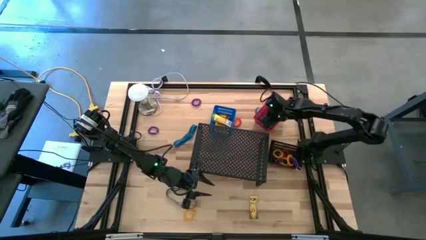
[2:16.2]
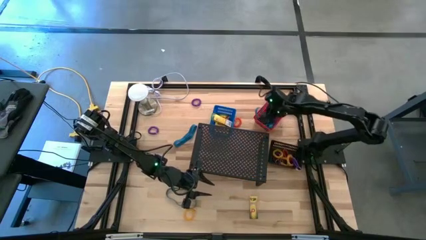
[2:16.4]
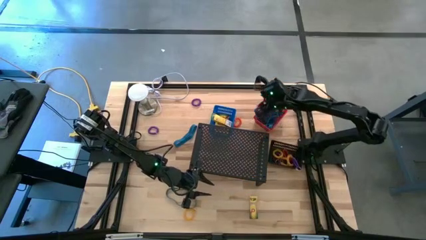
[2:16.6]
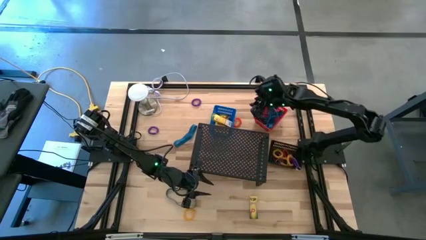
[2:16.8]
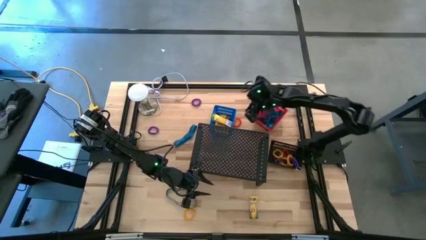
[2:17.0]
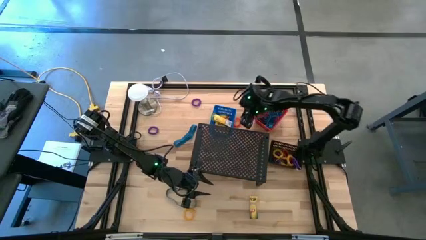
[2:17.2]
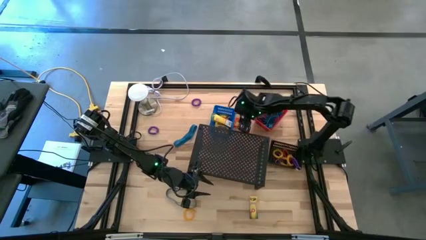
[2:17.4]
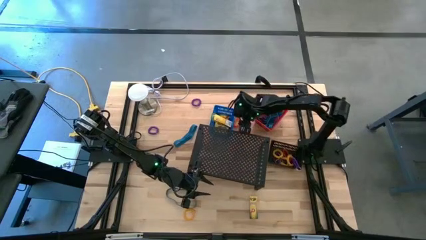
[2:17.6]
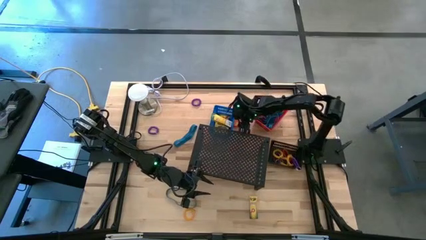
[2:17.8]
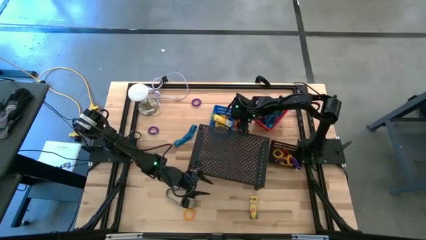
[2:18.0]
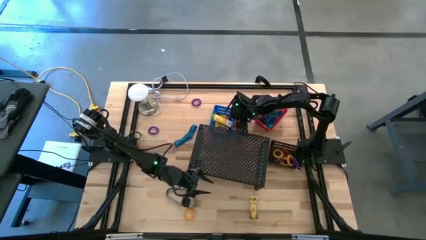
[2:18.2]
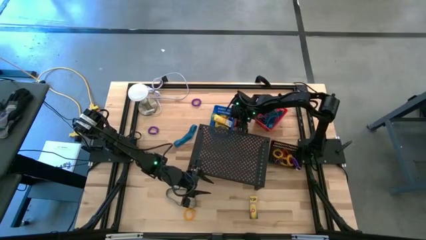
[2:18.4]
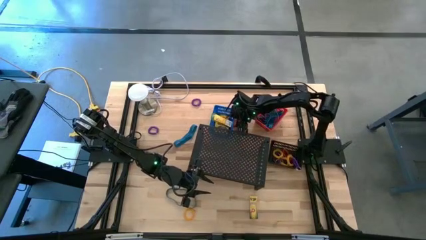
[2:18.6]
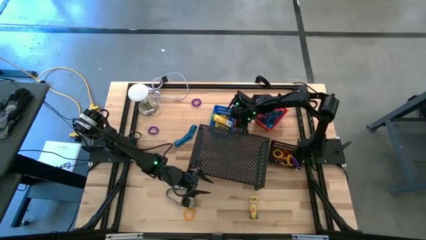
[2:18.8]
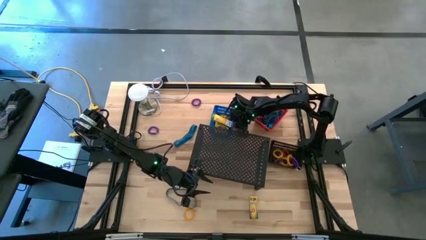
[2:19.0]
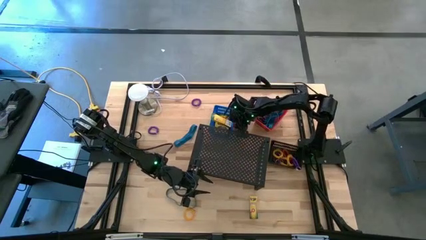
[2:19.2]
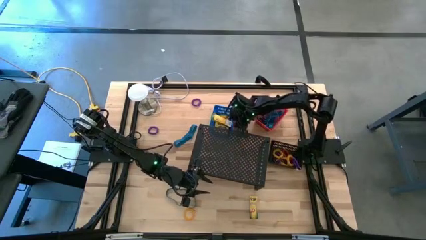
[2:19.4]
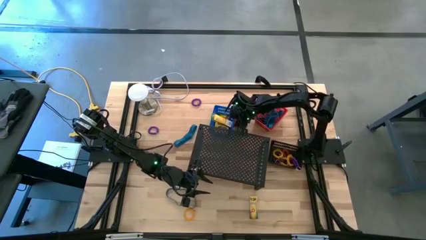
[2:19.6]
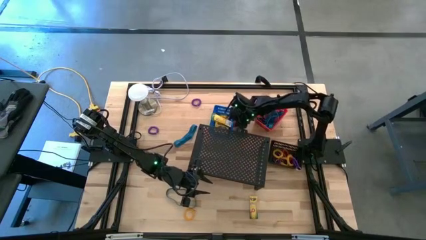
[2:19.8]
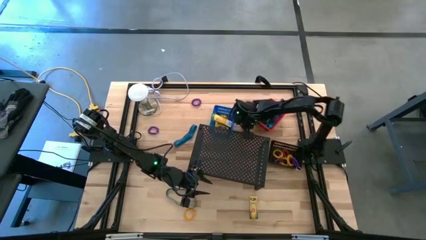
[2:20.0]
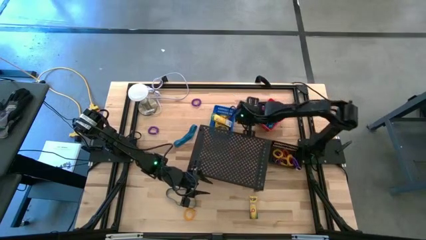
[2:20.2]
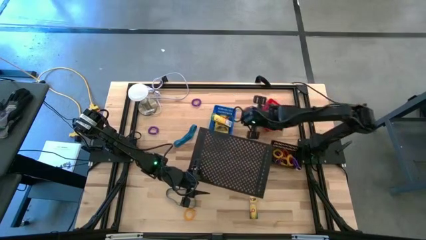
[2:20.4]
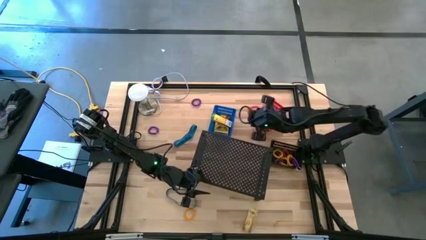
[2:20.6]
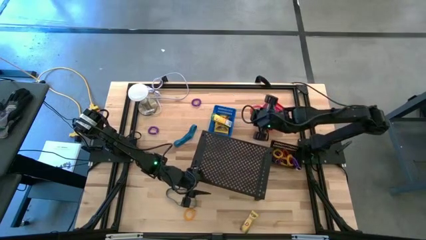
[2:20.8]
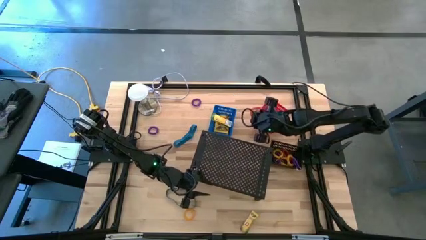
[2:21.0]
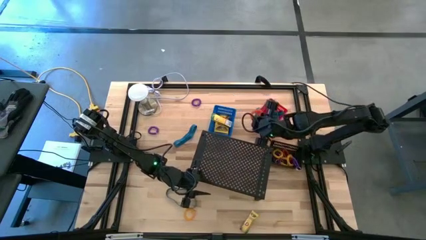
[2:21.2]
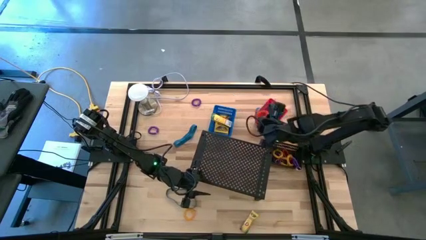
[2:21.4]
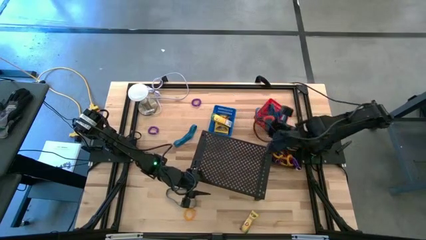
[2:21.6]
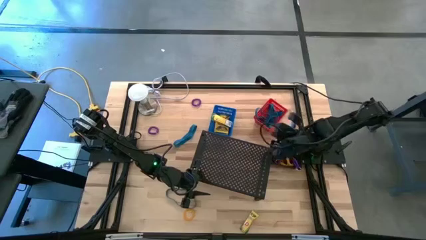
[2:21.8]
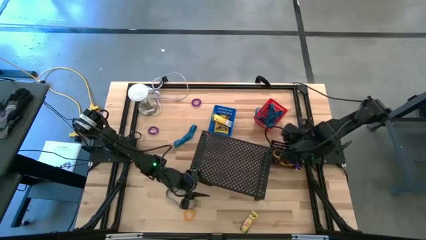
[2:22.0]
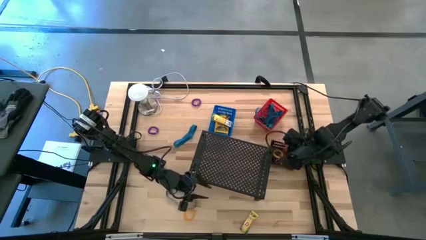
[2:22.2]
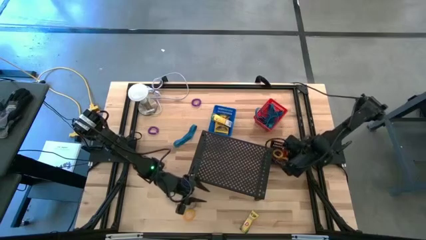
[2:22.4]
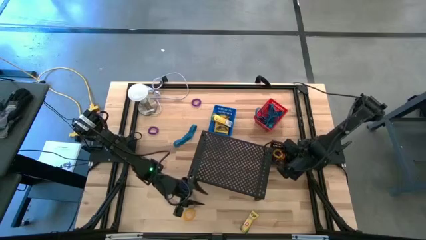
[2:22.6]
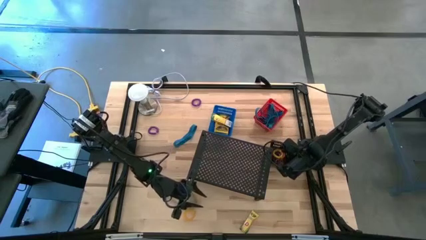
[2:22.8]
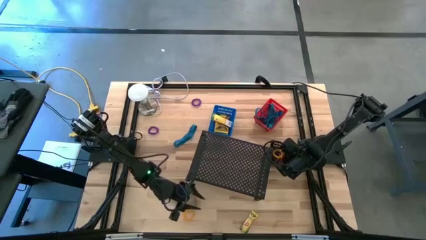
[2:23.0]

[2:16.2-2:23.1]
Task: Pick & Place Office Desk Supplies
Put the orange spiral keychain into the black bin

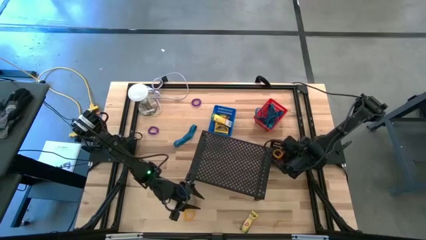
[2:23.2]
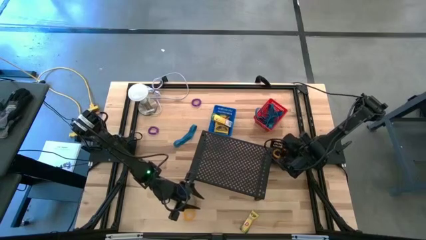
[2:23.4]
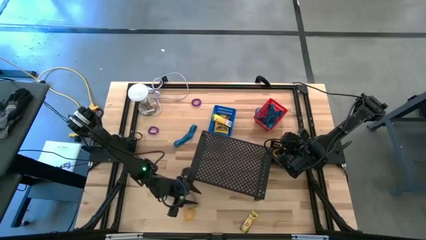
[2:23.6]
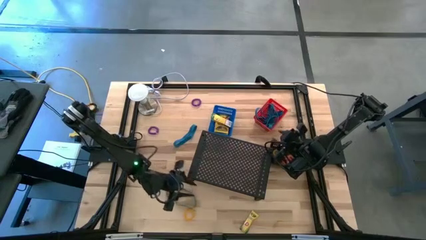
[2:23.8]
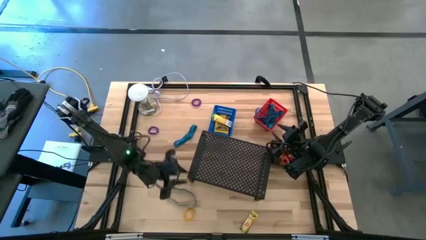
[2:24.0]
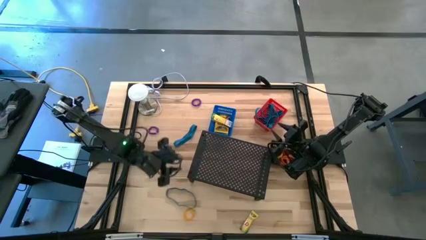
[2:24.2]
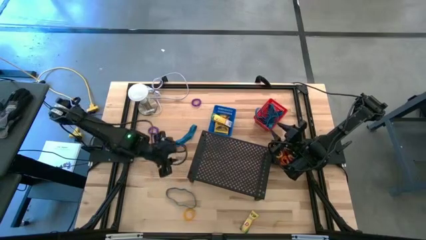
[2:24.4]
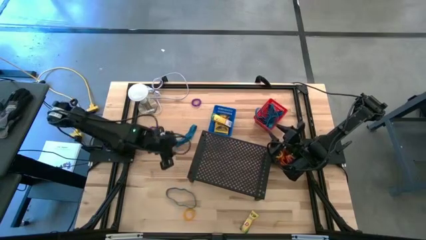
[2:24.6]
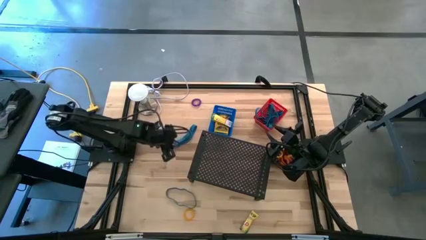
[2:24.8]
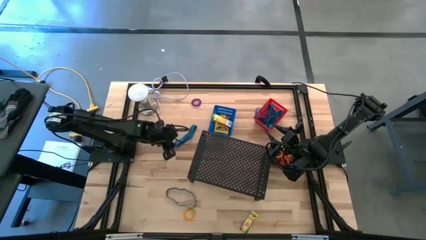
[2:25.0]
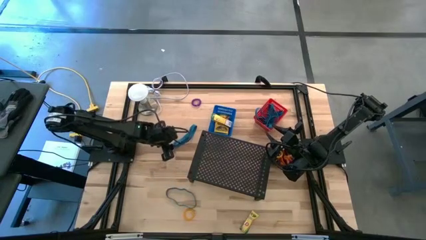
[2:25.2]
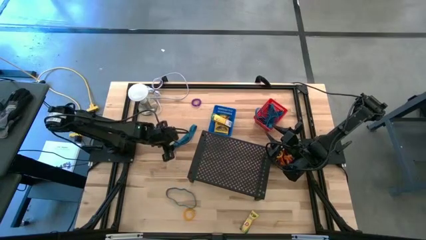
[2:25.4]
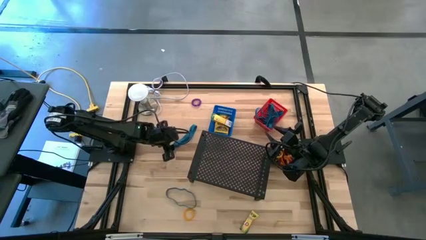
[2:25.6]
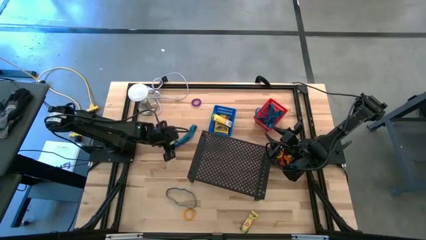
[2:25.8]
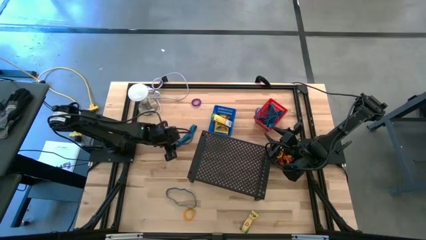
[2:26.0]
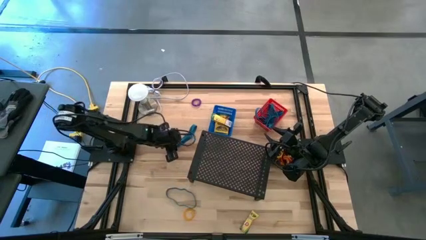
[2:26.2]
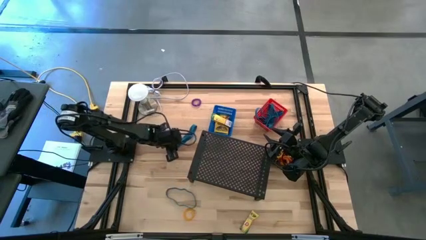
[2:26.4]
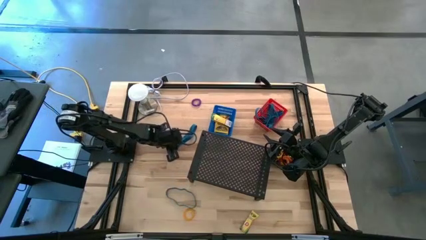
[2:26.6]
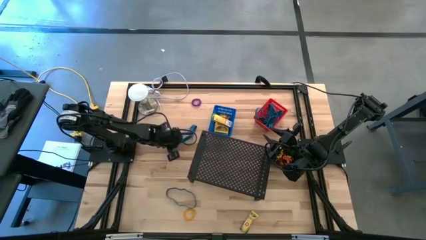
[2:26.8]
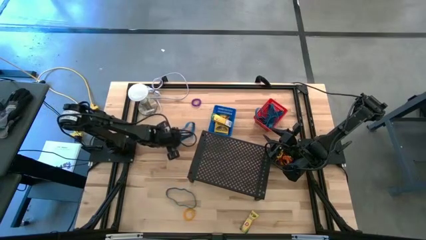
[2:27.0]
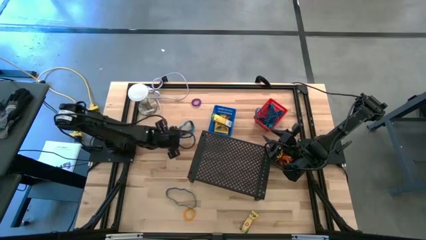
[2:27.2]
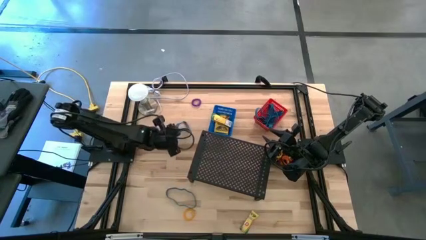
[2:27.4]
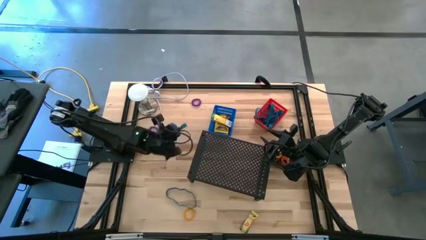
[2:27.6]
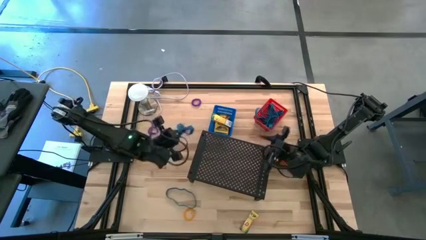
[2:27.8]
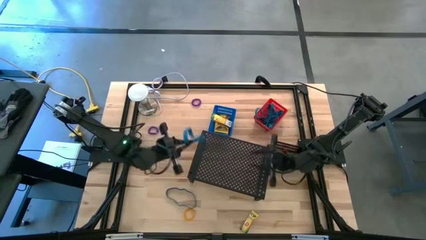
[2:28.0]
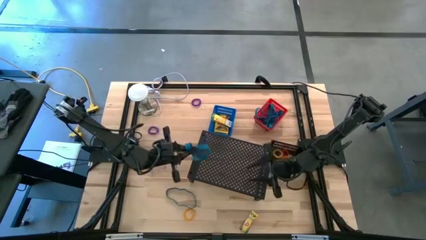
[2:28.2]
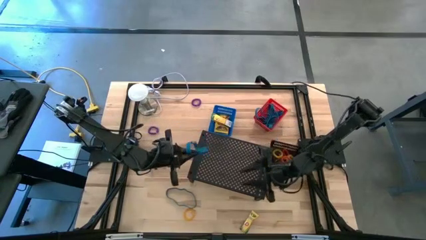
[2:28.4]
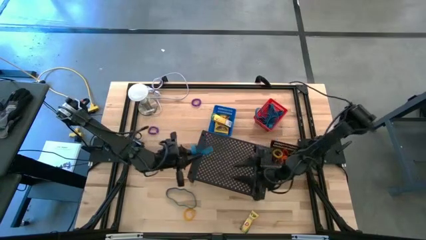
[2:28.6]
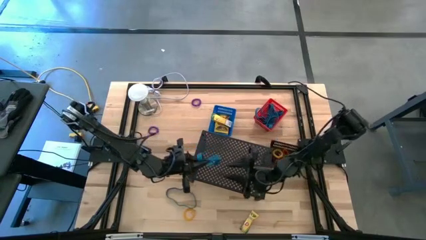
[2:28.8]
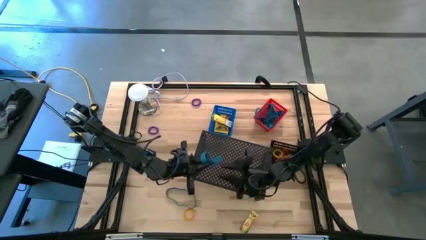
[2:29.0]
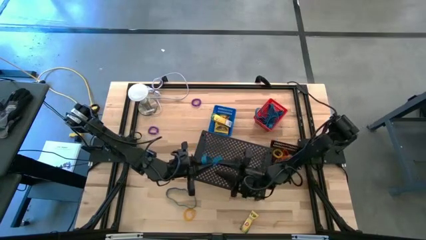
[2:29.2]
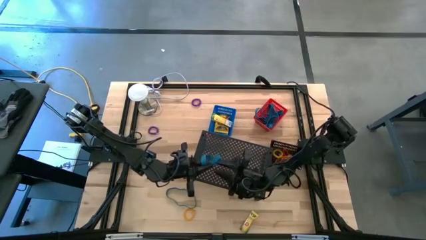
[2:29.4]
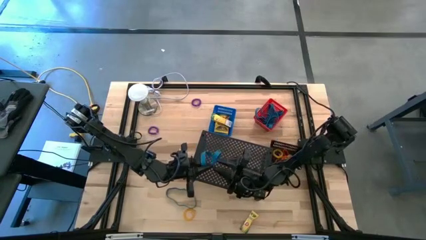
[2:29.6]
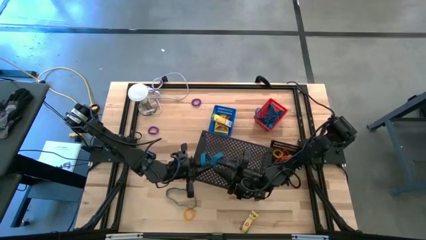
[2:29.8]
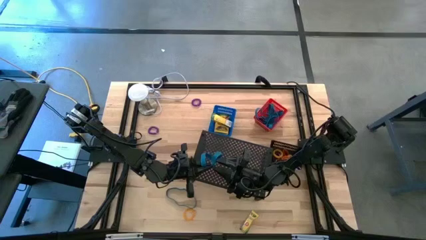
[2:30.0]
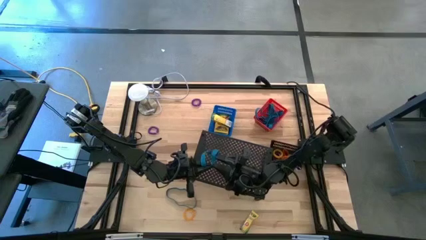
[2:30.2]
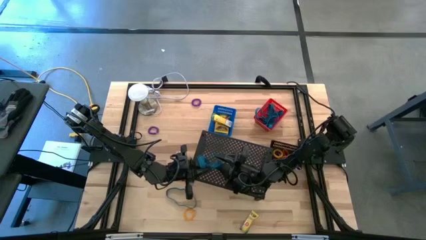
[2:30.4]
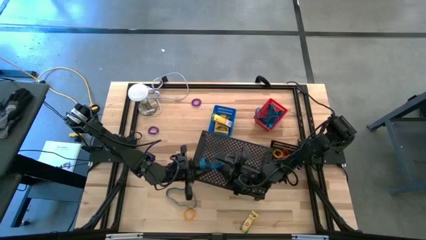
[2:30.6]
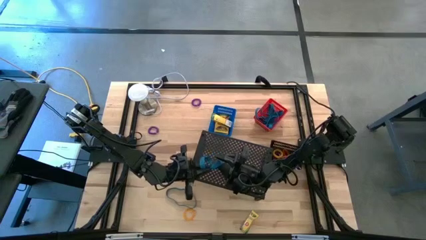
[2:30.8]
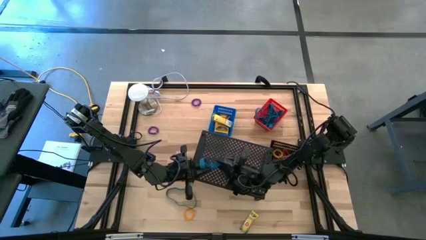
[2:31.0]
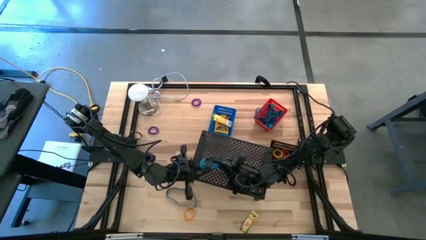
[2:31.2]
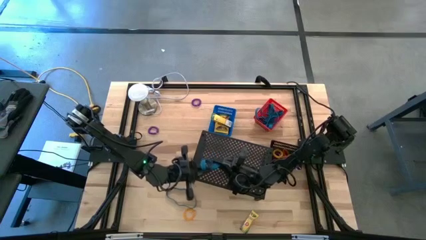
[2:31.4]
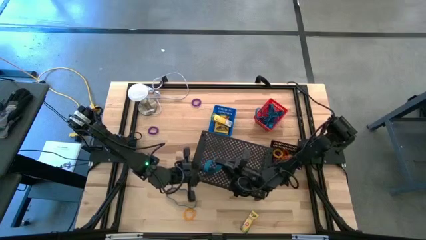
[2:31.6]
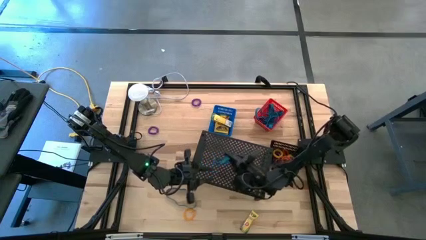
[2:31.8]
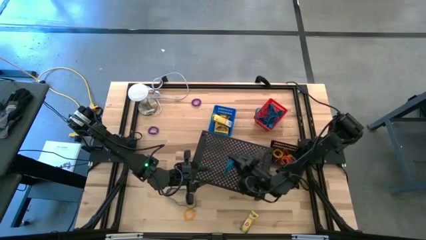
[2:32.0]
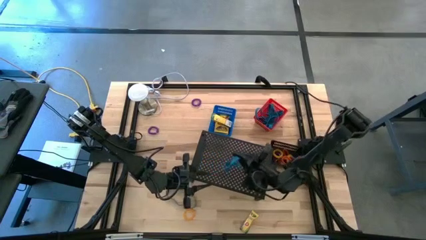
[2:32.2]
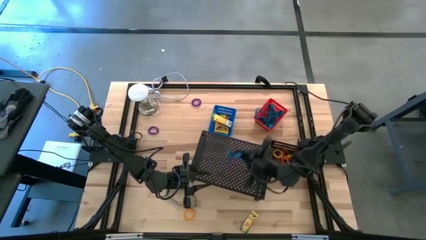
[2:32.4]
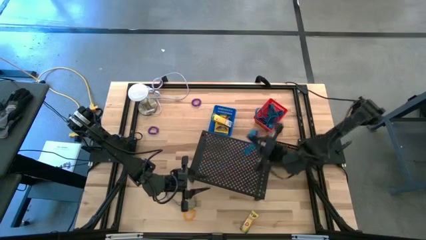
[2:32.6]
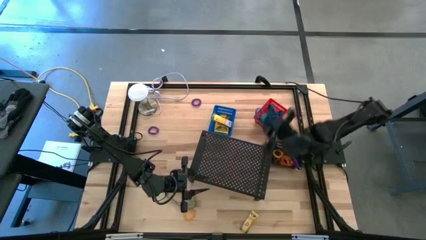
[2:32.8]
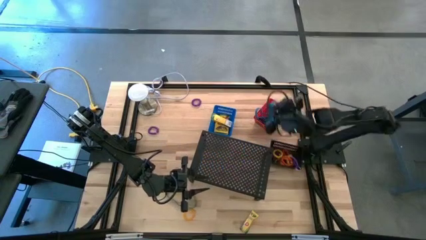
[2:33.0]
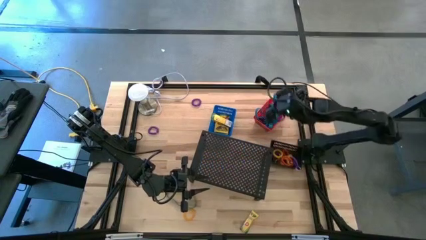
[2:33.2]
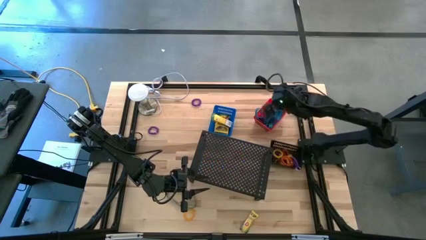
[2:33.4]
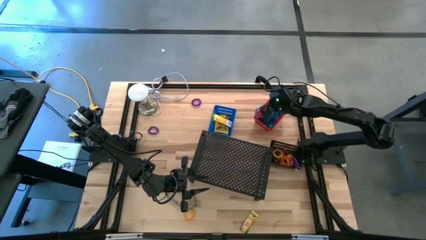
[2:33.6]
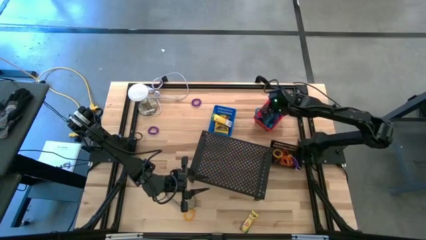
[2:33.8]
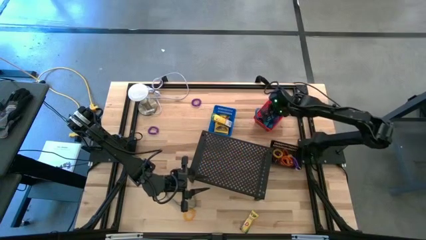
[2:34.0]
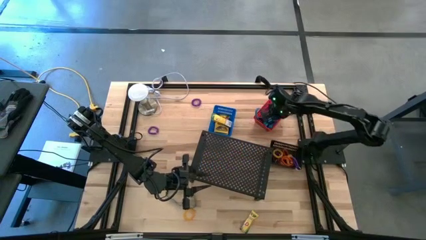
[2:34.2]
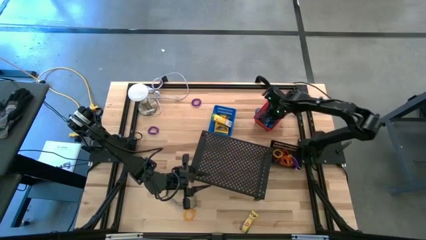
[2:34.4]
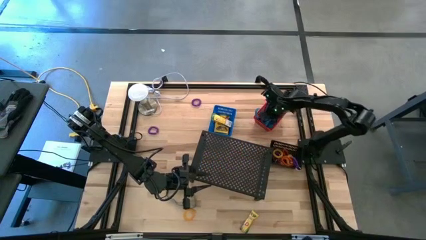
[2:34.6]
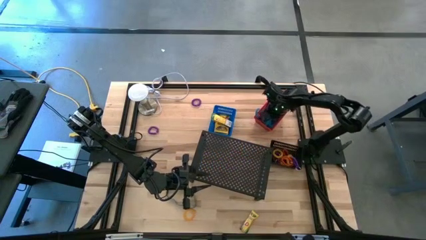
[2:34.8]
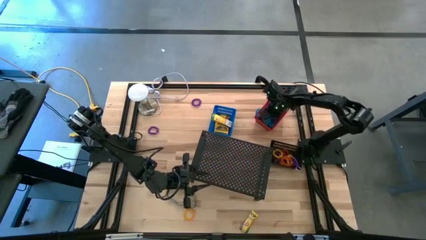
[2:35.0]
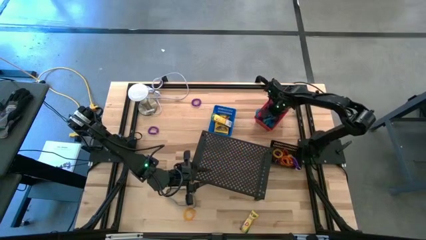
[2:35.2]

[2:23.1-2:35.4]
Put the blue rubber band into the red bin
